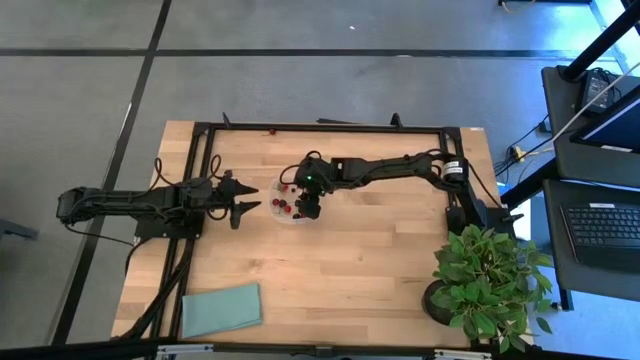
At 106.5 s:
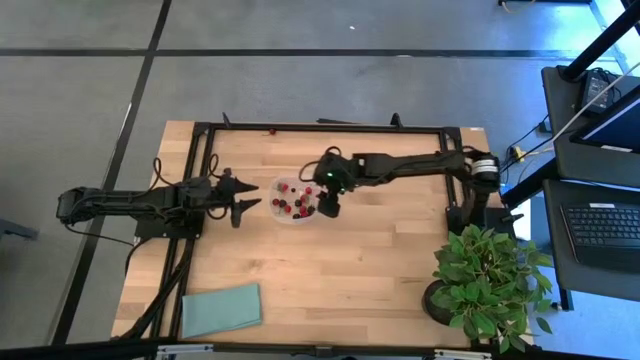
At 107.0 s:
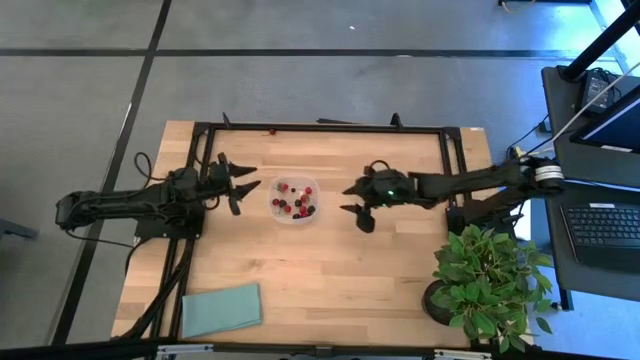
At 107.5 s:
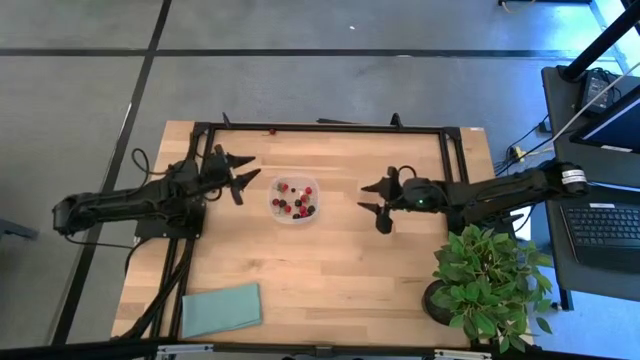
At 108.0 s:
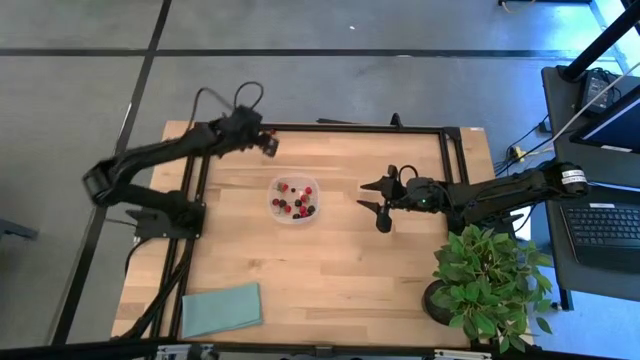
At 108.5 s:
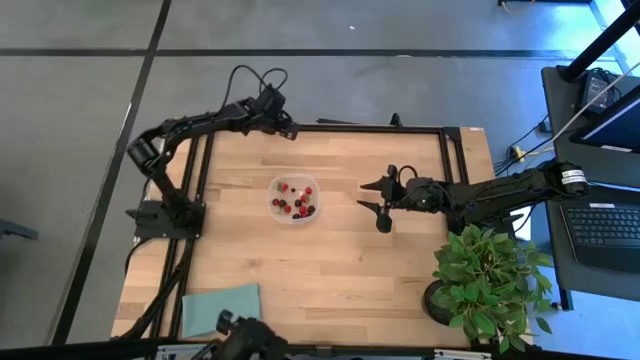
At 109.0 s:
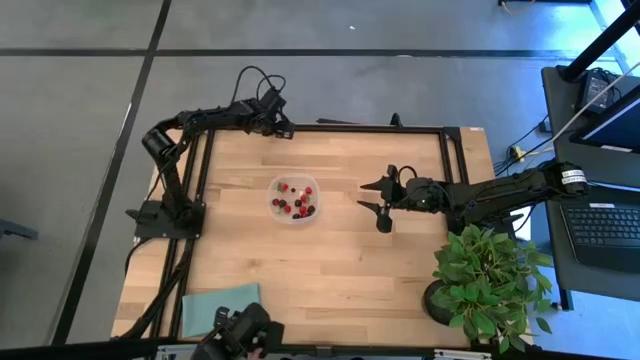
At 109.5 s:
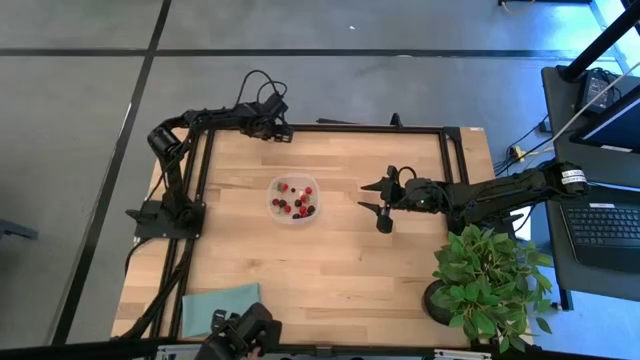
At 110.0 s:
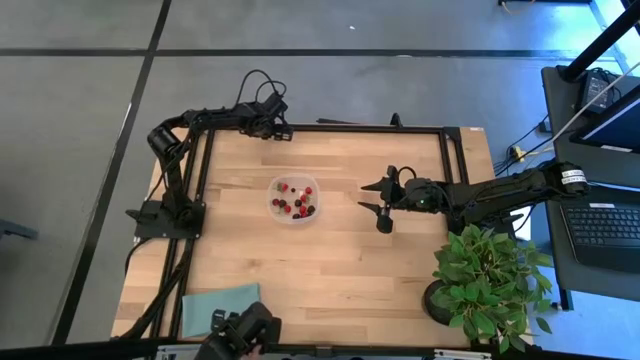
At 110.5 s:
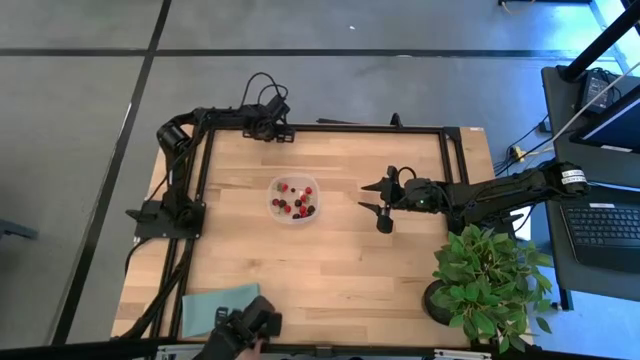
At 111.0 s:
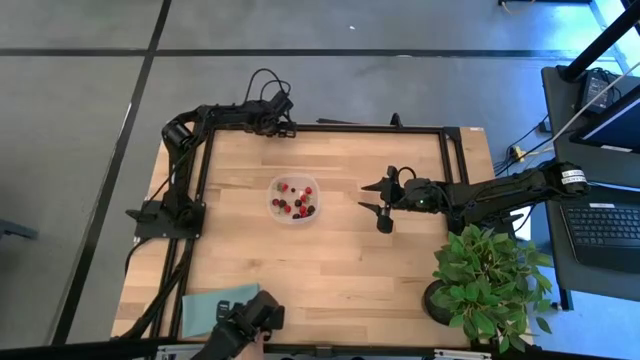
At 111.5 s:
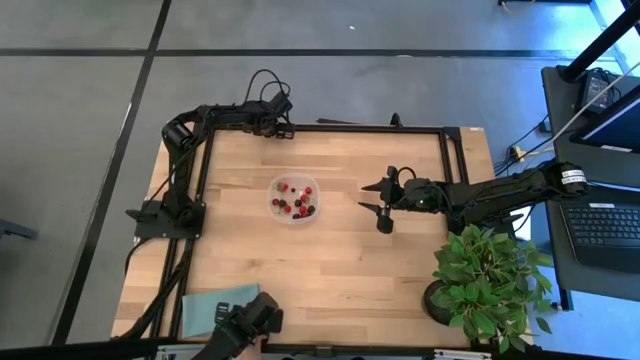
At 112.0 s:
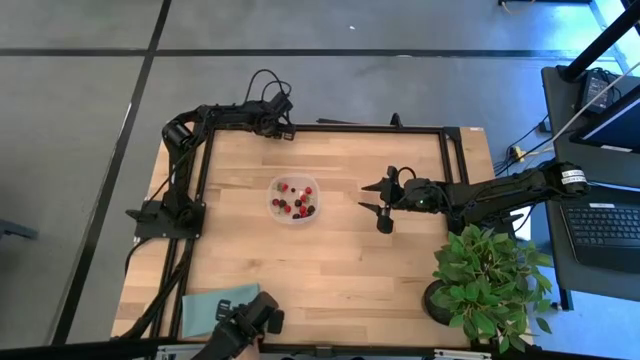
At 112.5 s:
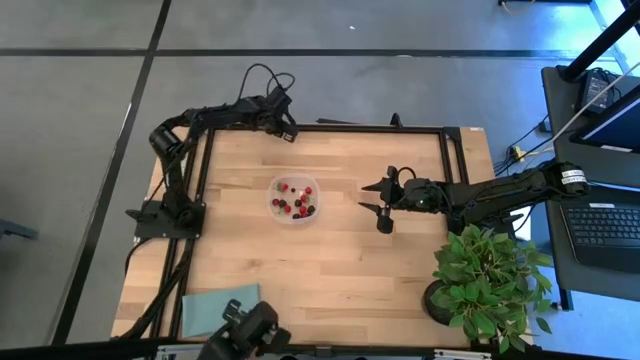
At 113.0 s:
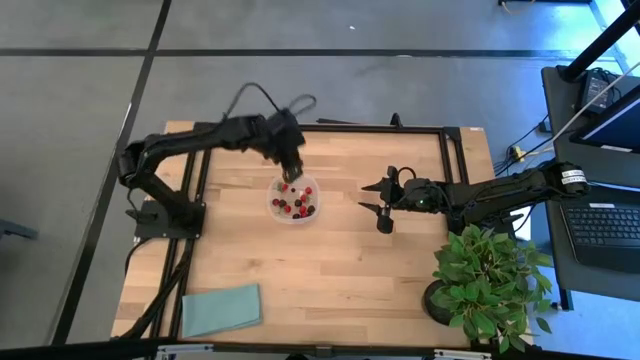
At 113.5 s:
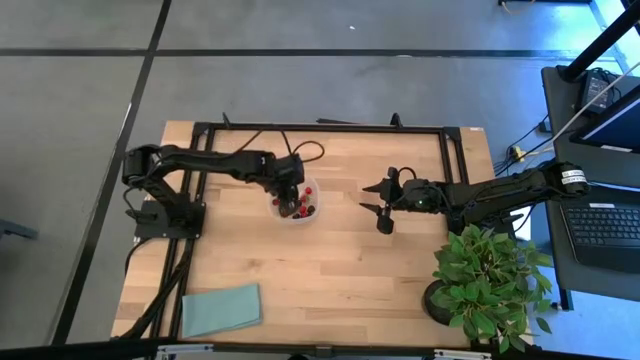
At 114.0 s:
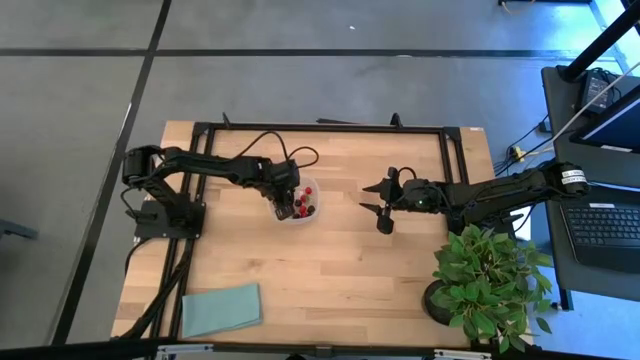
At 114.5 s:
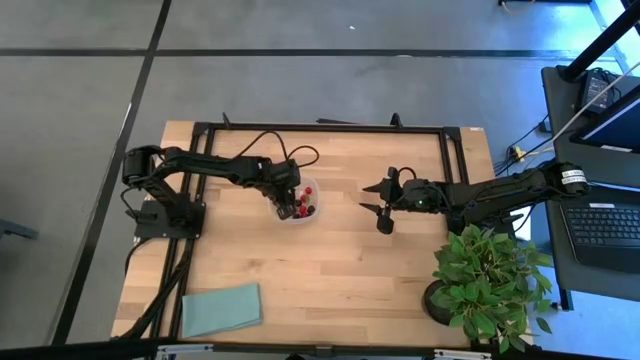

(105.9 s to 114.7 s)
Task: Pick and placing Produce into tupperware
Put the red cherry into the transparent container

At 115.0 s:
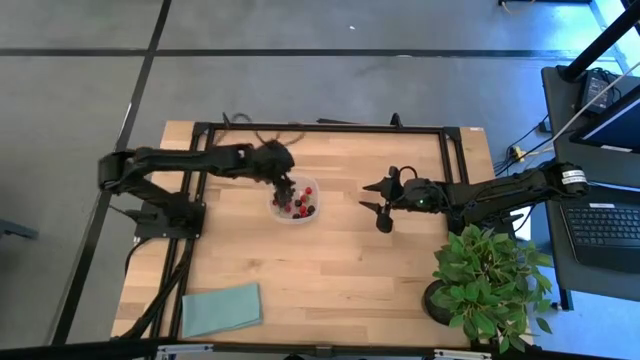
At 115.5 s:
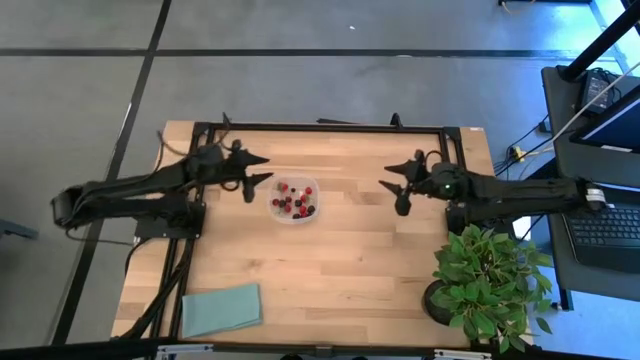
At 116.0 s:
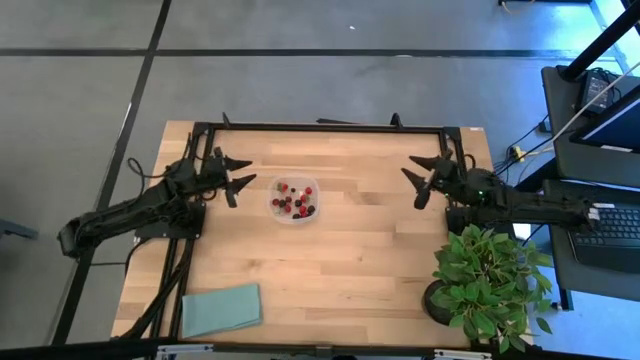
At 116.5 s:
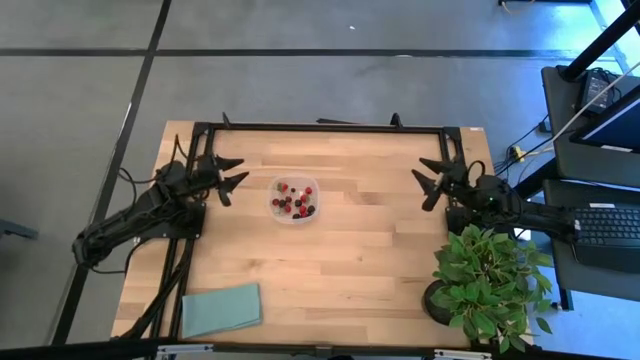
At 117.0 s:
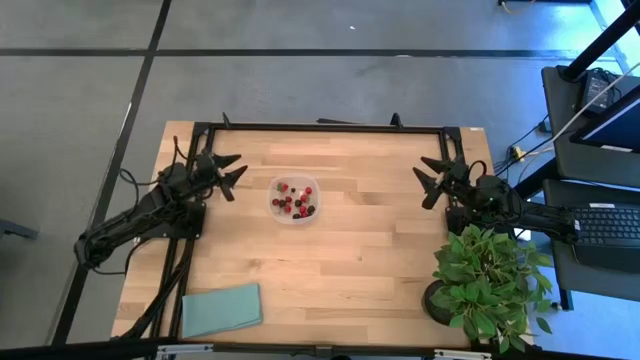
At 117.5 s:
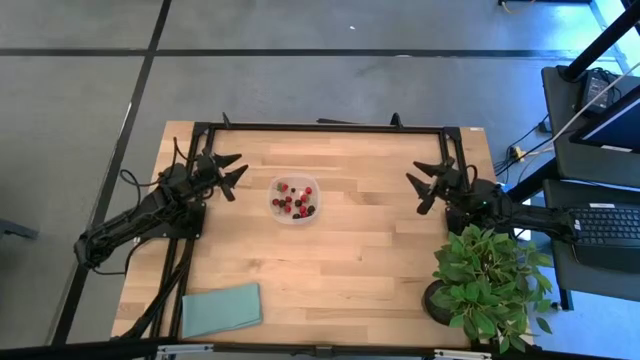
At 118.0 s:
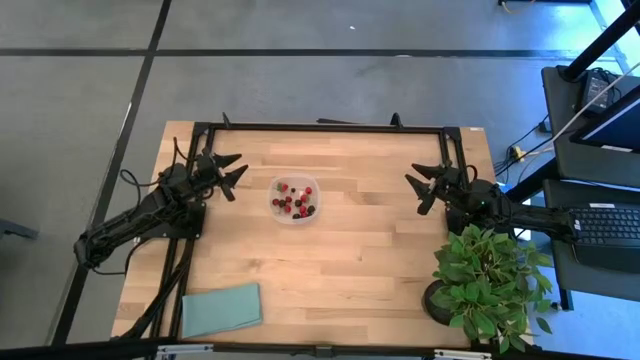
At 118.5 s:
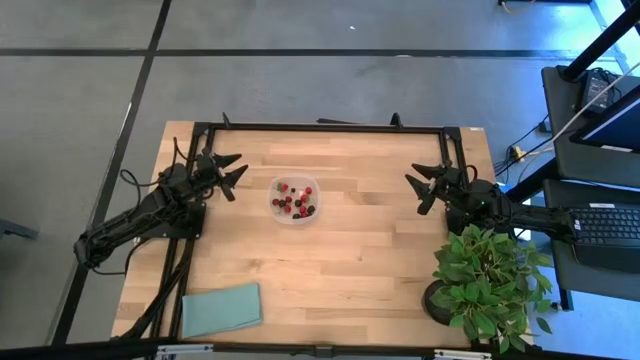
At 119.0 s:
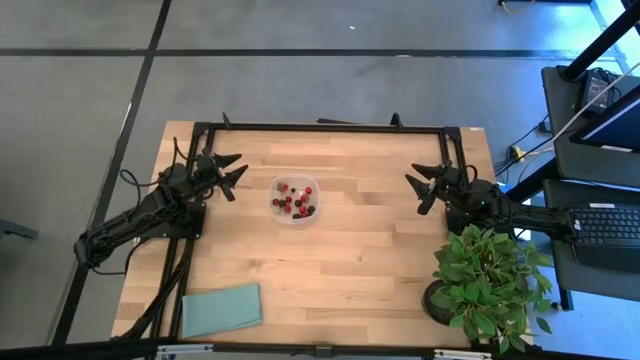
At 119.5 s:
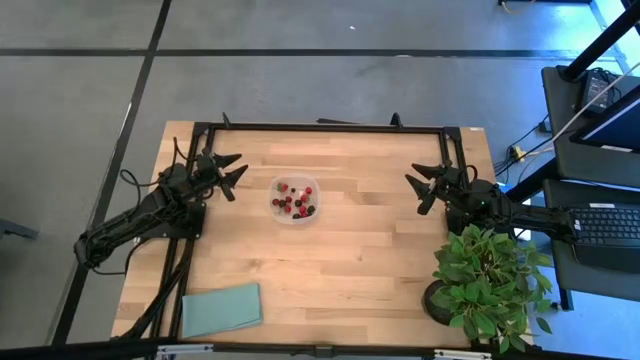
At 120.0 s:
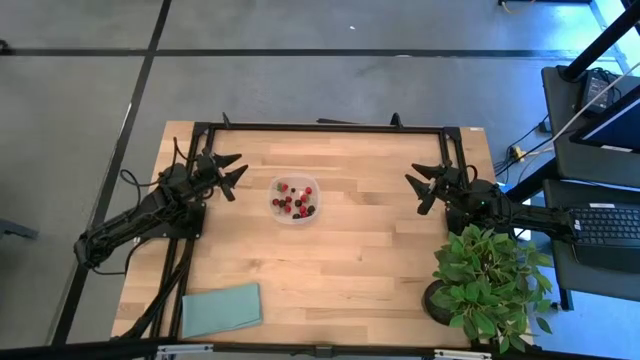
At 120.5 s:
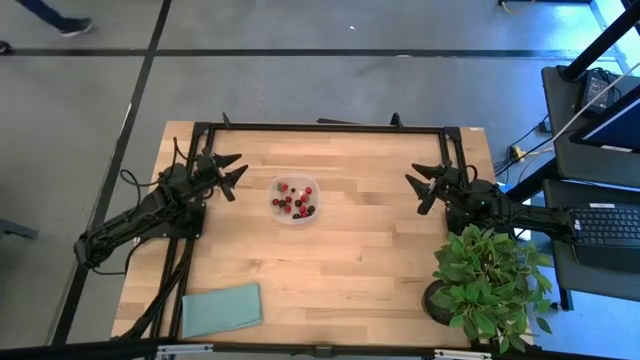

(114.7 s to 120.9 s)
Return to Home Position

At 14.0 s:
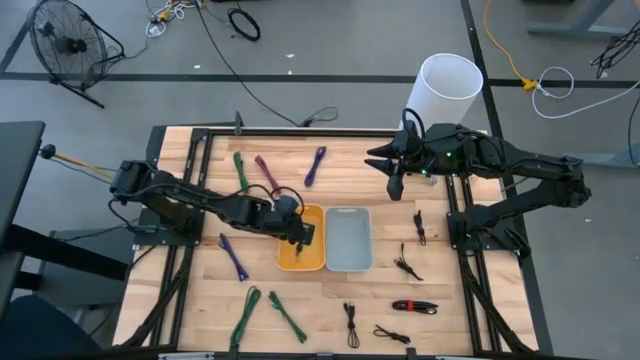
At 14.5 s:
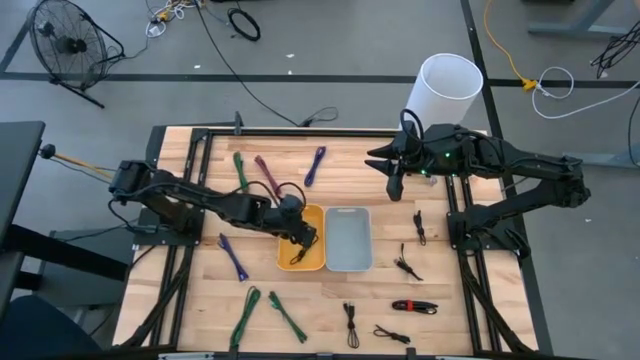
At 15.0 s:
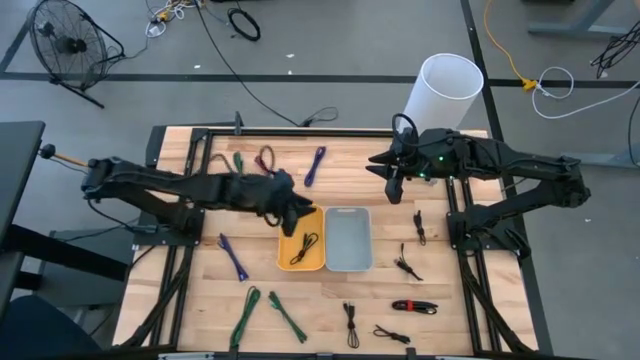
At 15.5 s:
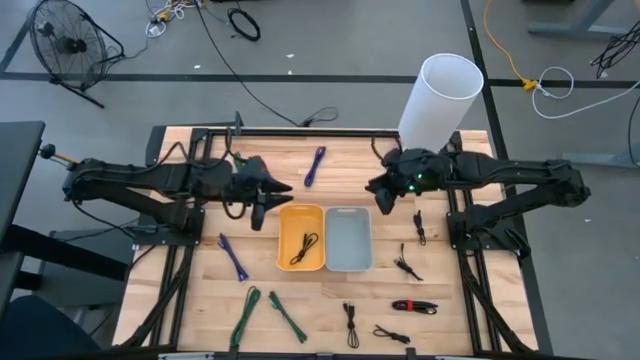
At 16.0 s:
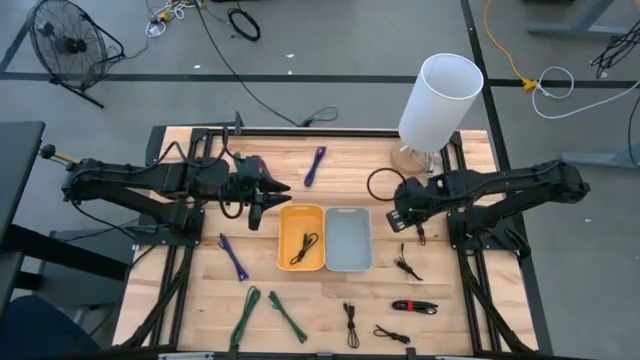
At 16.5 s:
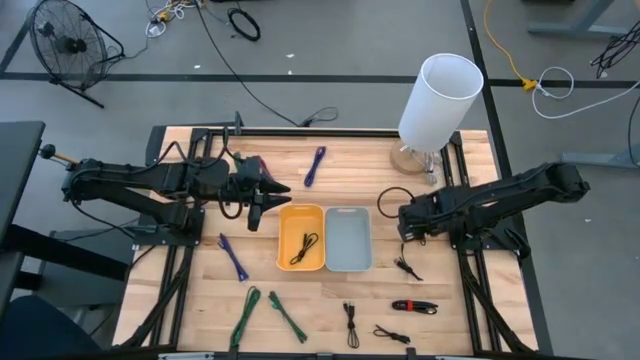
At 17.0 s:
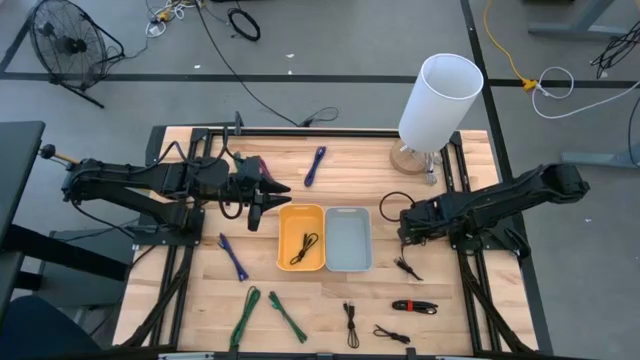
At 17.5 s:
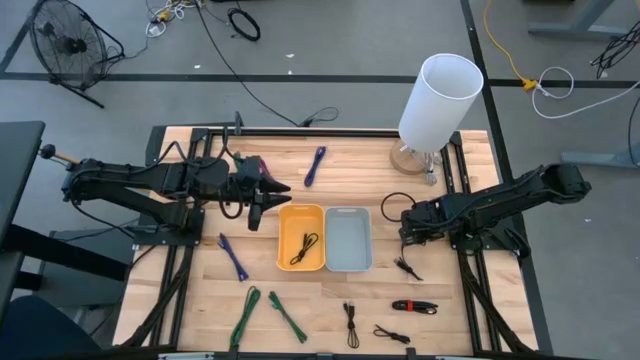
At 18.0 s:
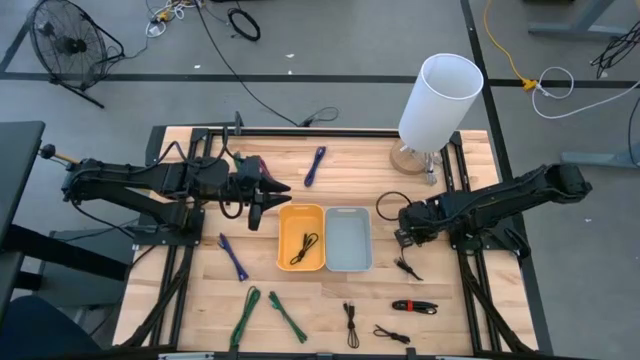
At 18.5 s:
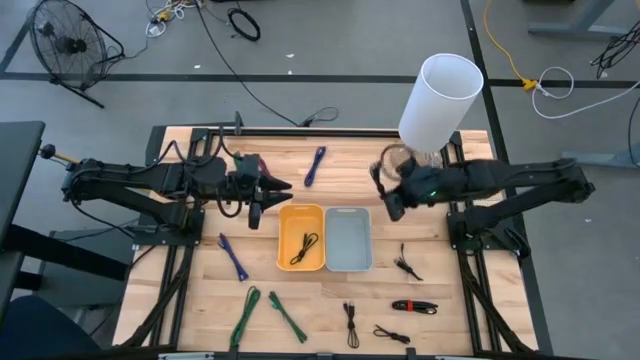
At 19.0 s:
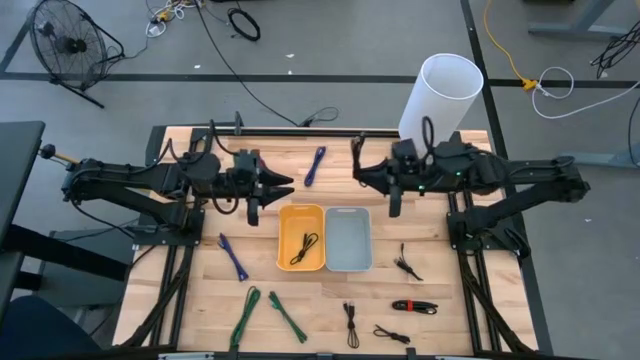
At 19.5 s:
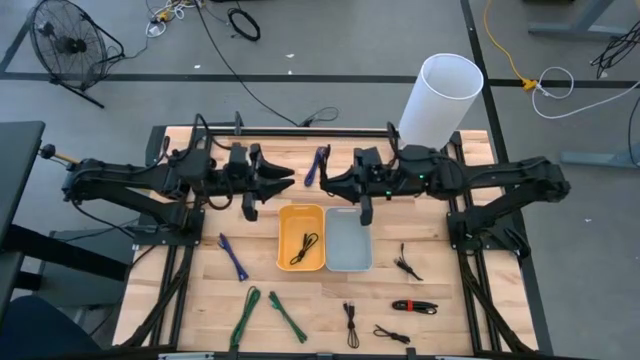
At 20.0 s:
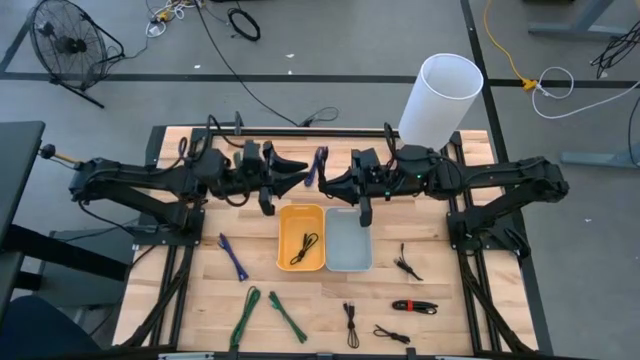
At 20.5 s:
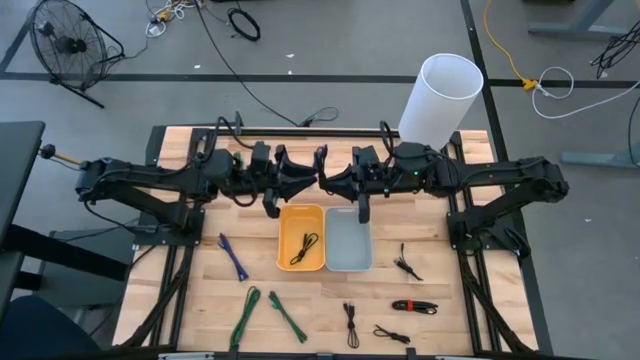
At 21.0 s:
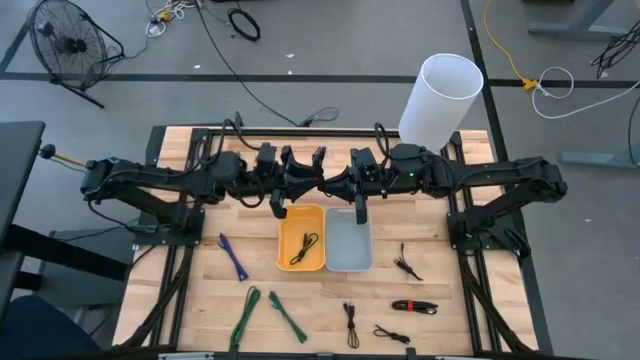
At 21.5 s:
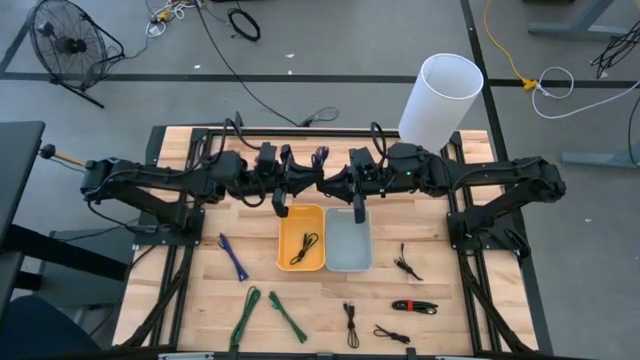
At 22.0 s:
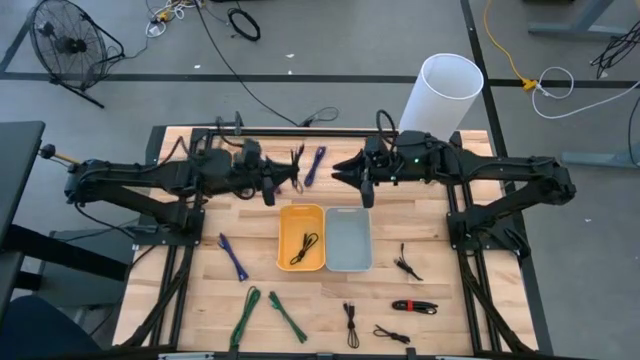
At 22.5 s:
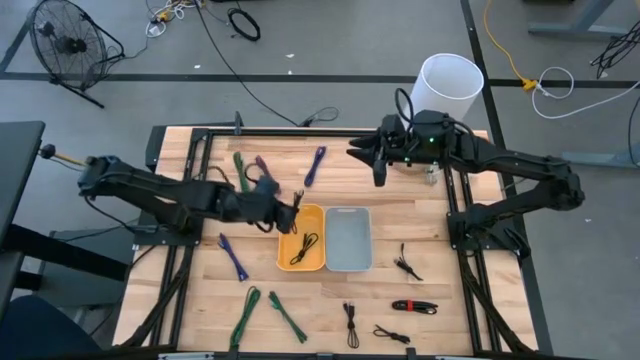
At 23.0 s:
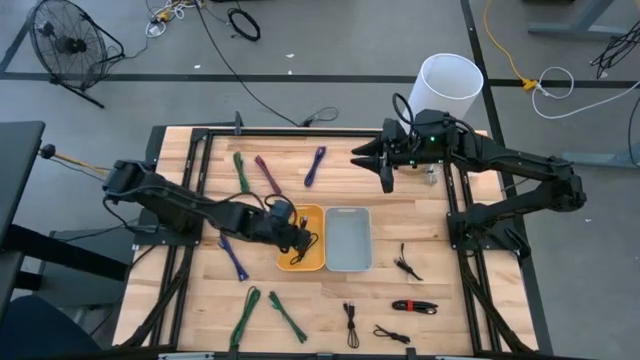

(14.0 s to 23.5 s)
Task: Pick & Place USB Port
Put the black charger cable into the yellow bin
